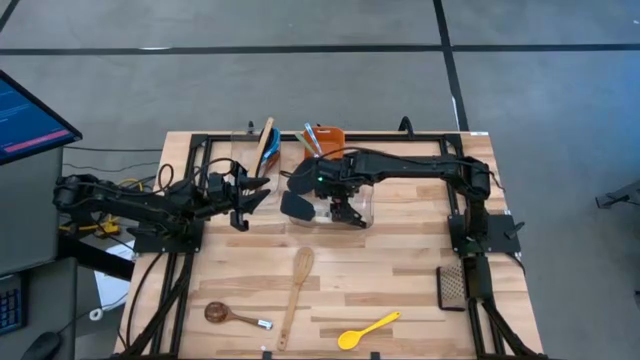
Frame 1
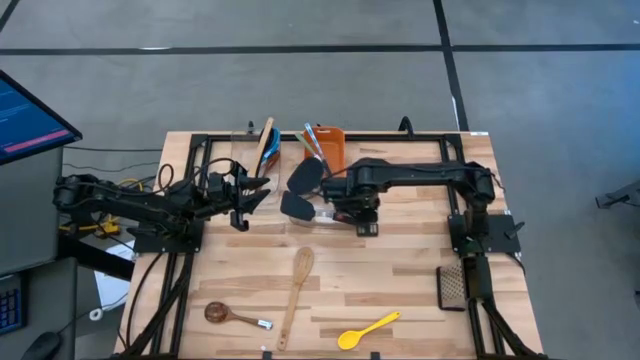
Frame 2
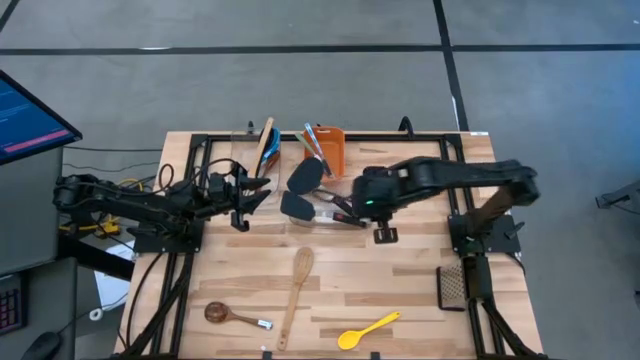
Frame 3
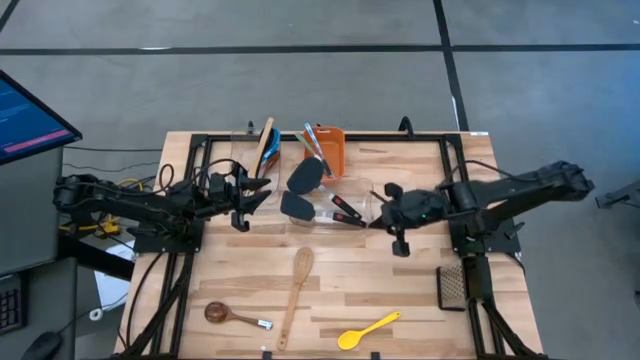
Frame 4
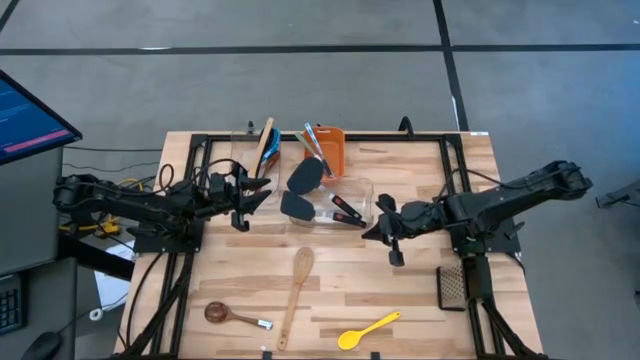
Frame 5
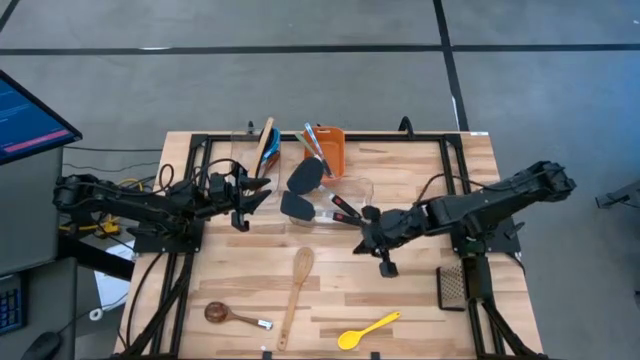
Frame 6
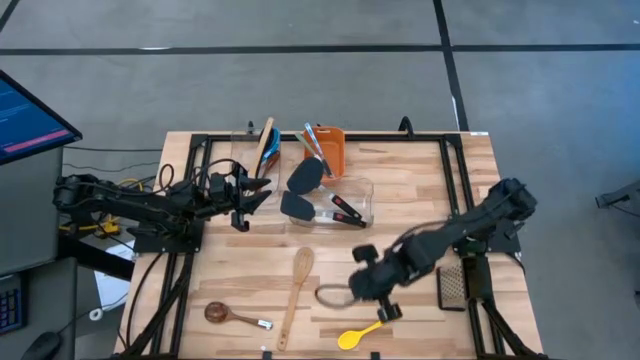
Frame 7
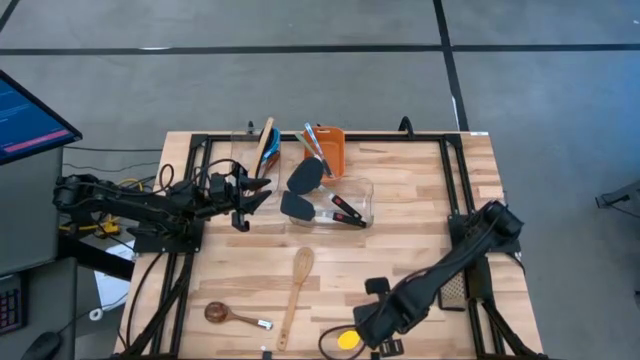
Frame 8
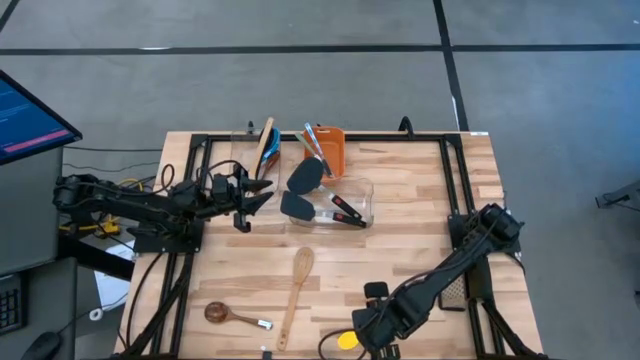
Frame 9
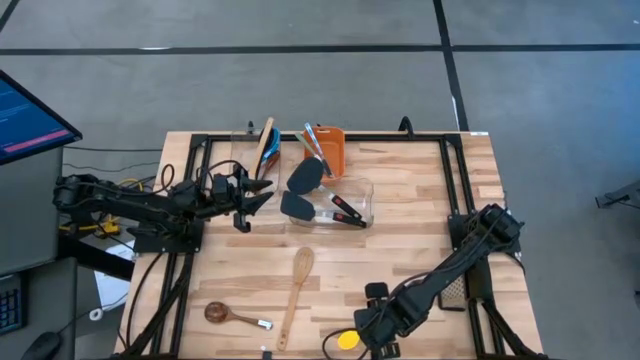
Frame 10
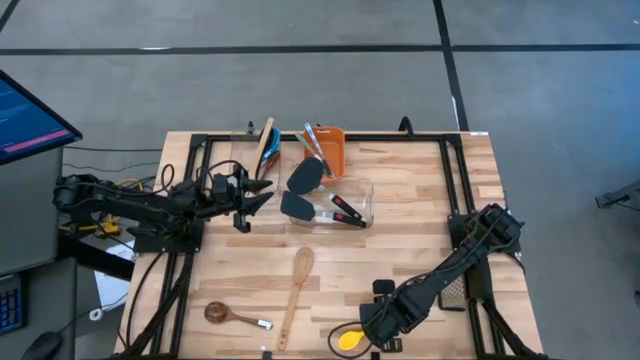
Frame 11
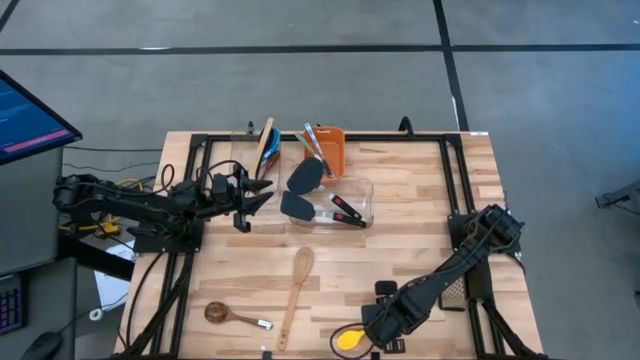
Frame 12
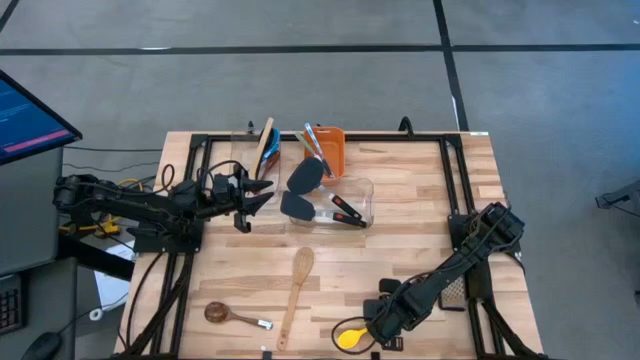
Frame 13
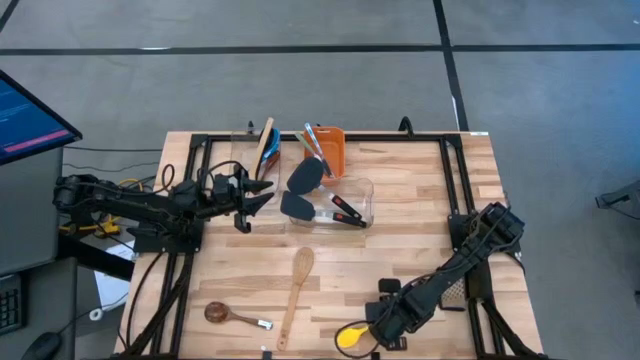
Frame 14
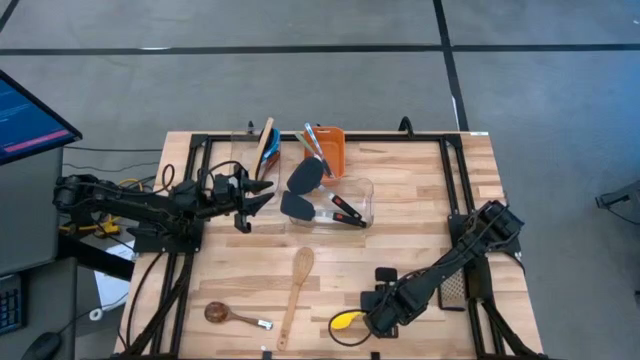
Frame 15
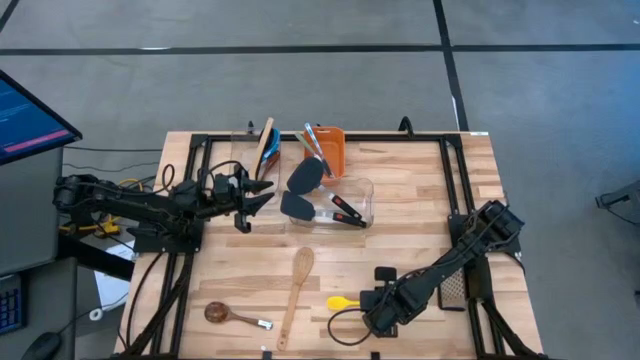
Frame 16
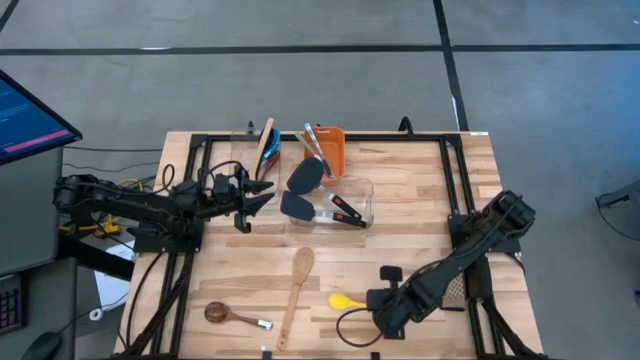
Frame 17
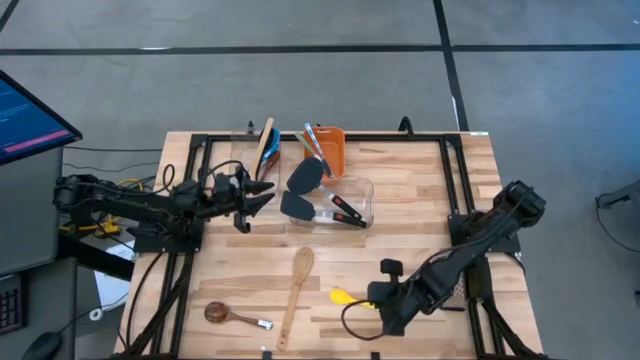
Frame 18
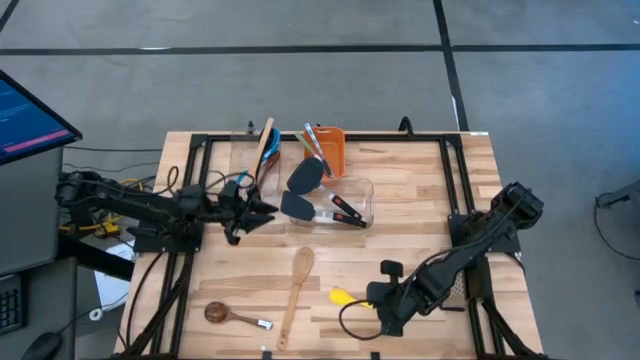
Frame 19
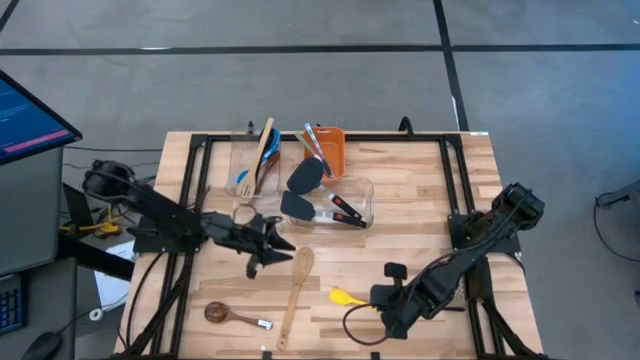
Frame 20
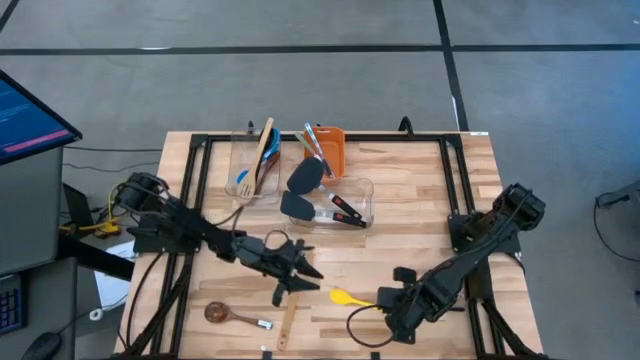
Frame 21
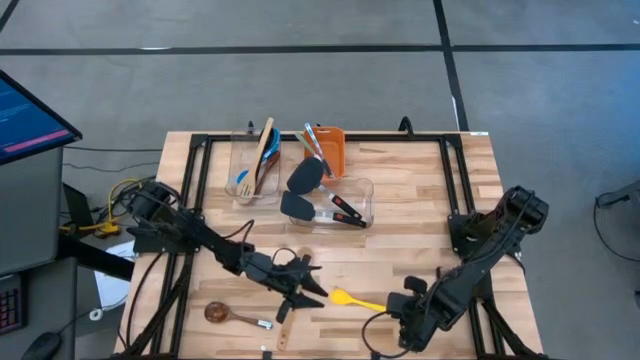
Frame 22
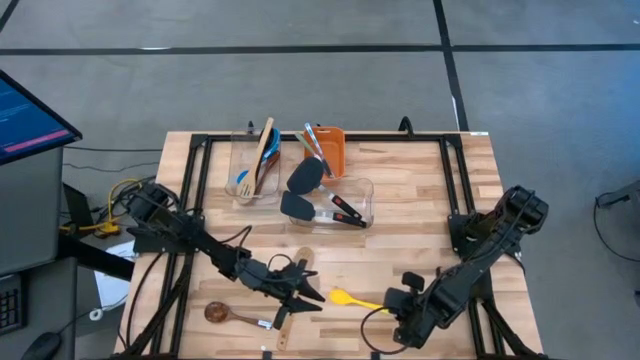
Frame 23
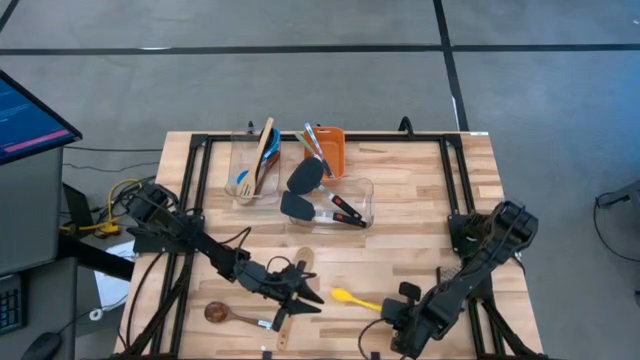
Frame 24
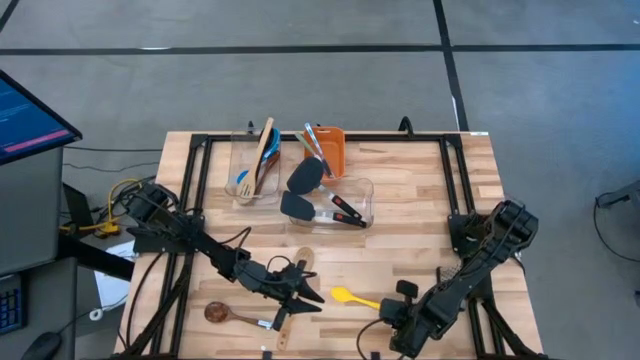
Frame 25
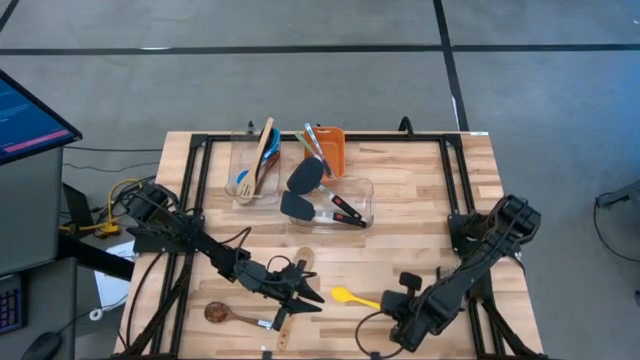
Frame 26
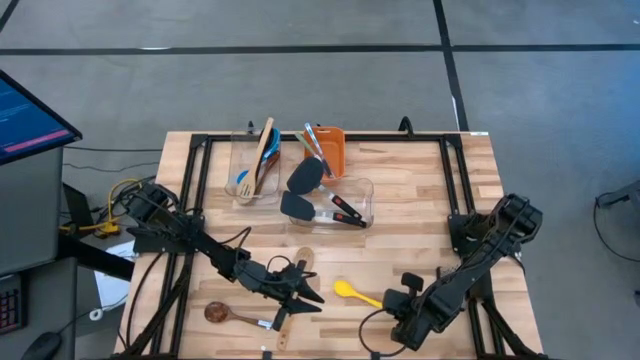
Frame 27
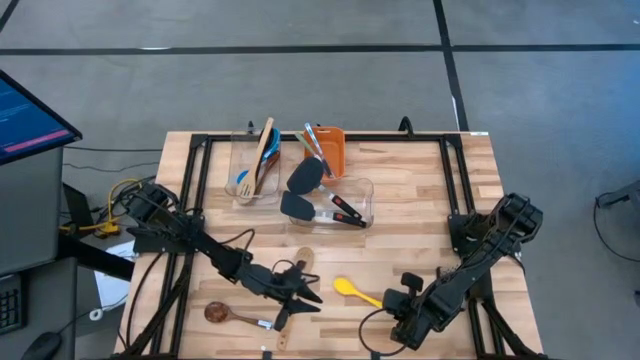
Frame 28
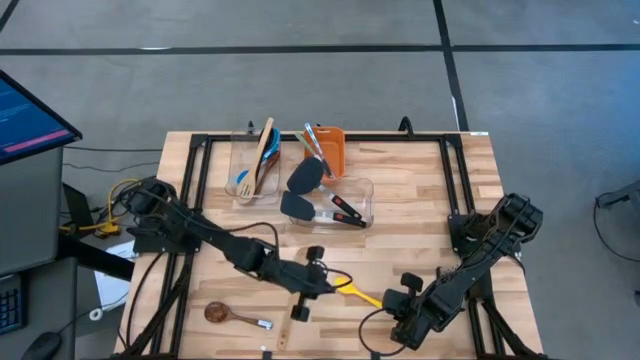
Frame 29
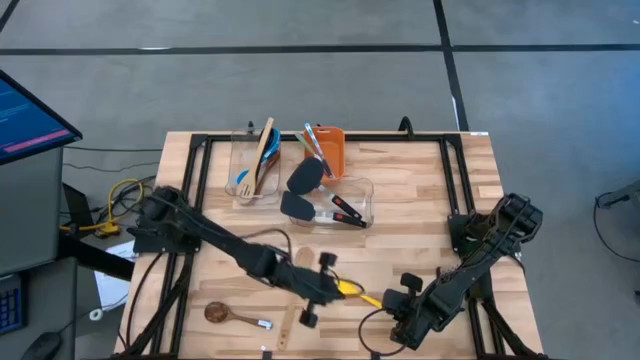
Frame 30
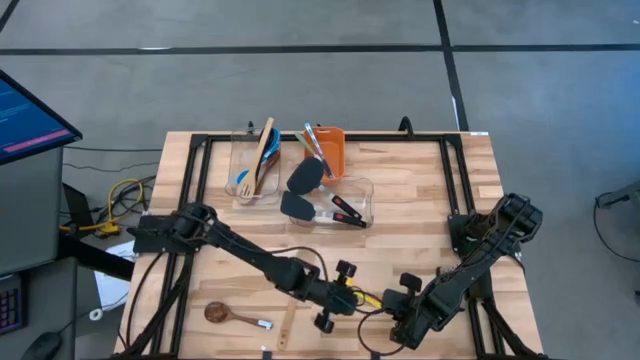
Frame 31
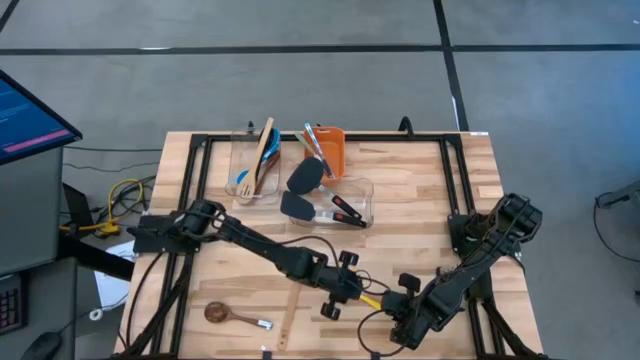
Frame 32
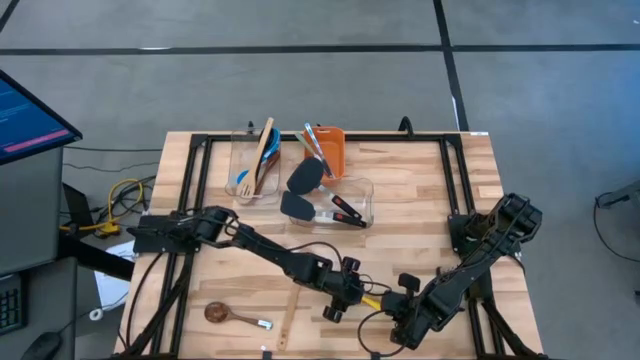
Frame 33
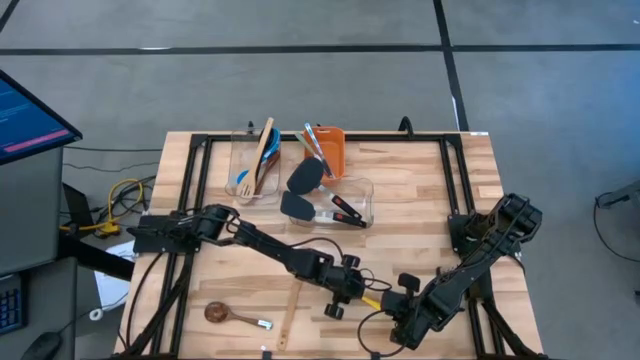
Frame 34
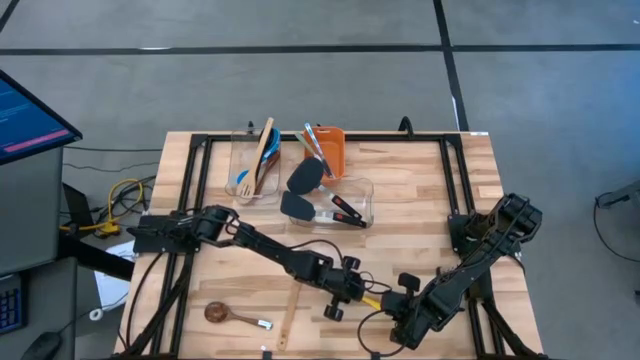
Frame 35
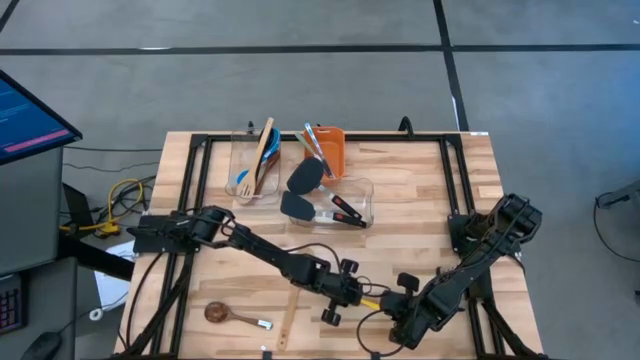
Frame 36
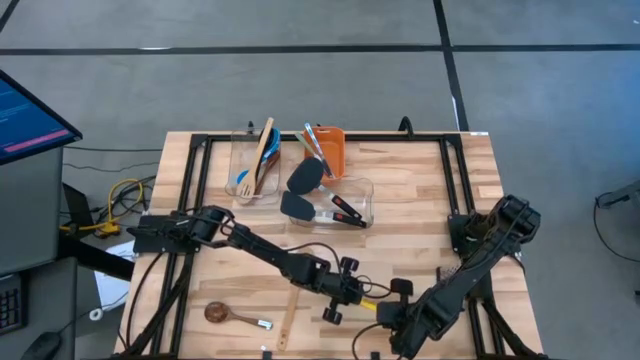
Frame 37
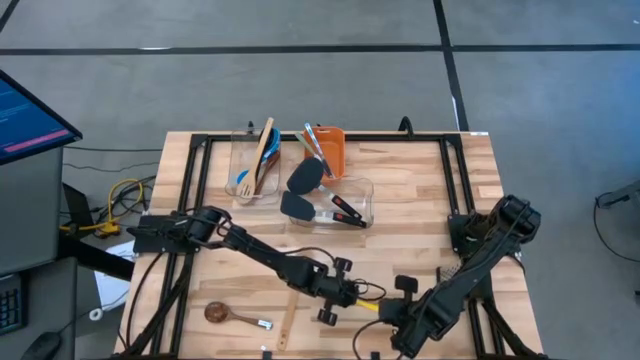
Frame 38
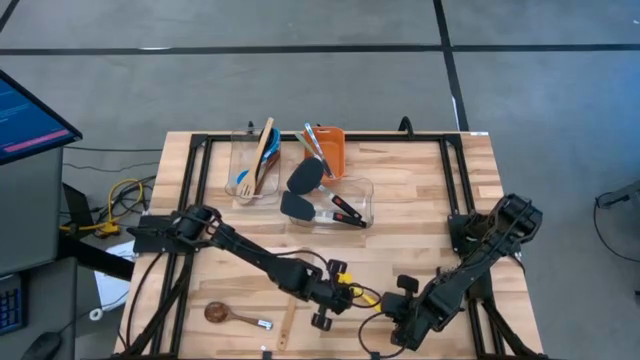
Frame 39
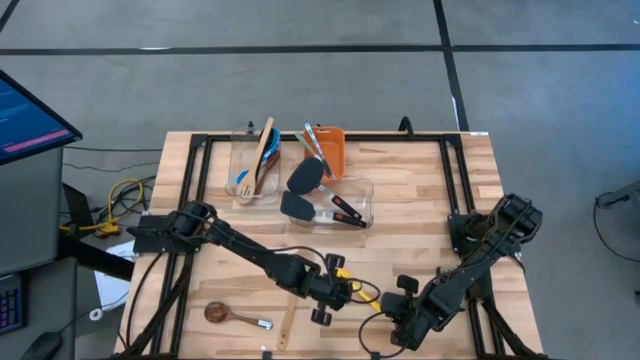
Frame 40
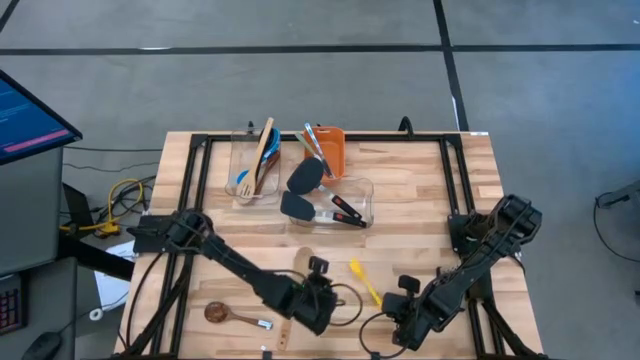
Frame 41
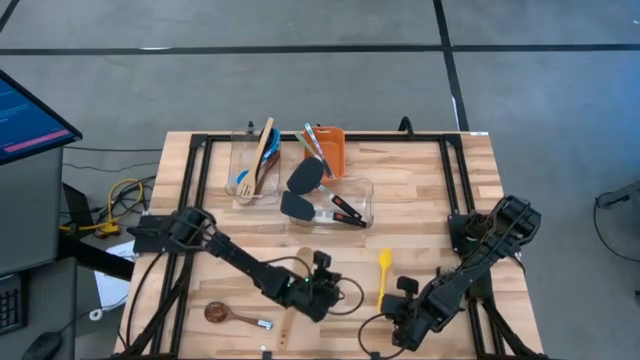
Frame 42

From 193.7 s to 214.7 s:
Task: Pick & Place Kitchen Items
Put the yellow serving spoon into the bottom transparent bin

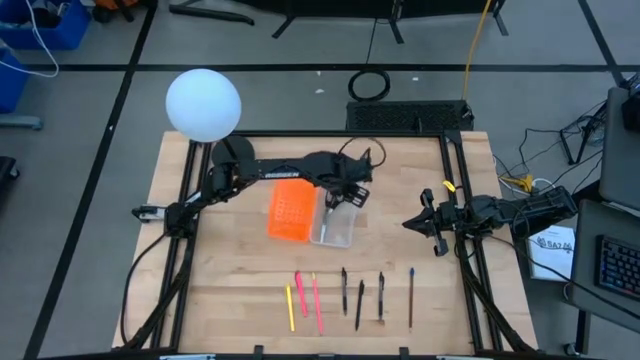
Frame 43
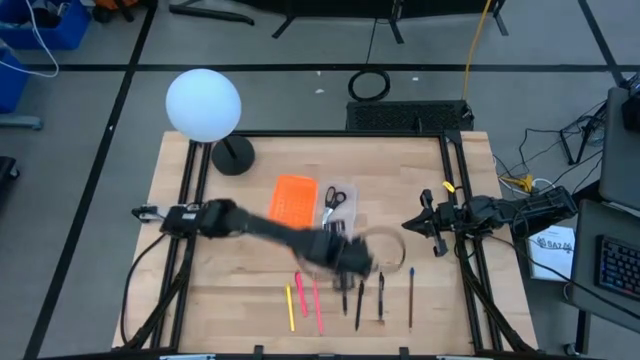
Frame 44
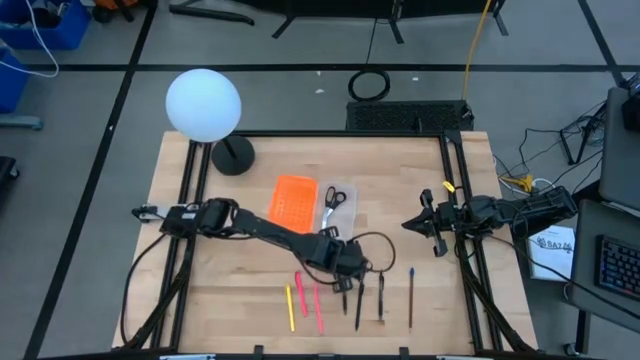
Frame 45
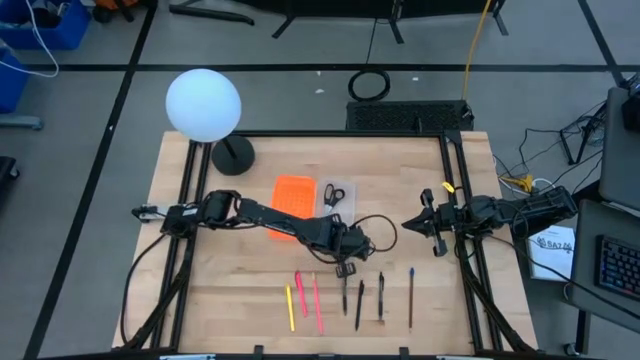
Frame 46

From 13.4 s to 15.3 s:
Task: Pick & place school supplies into a supply box
Adjust the orange supply box
